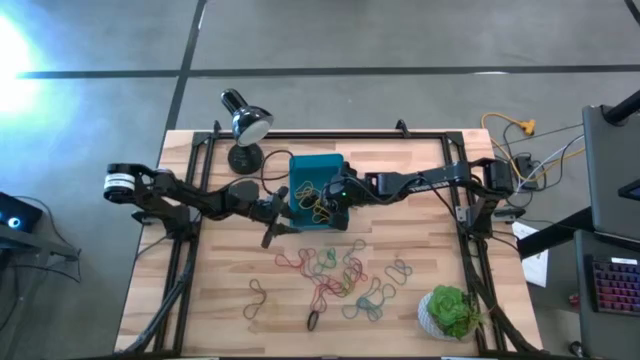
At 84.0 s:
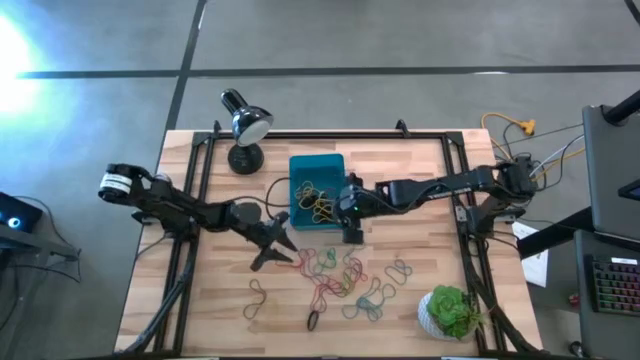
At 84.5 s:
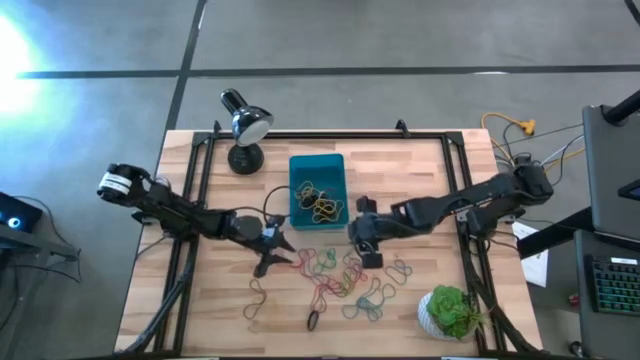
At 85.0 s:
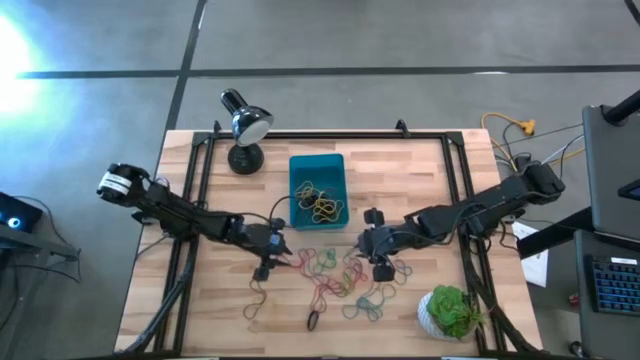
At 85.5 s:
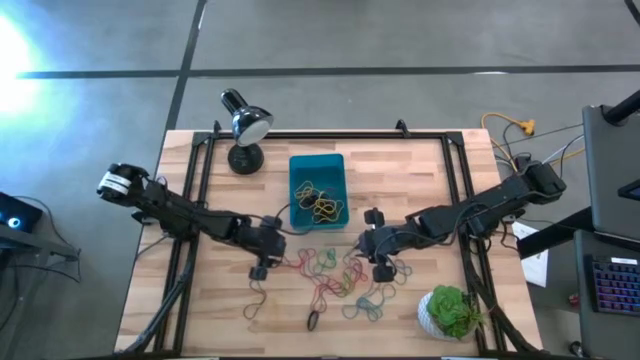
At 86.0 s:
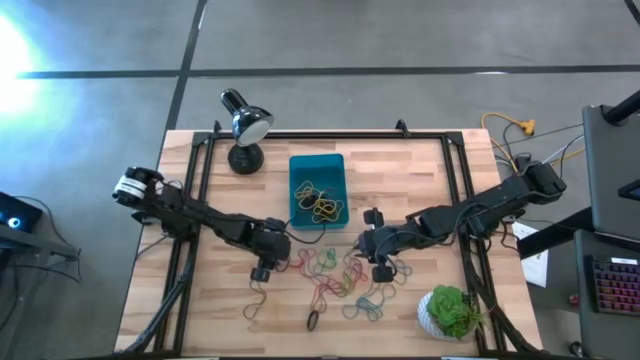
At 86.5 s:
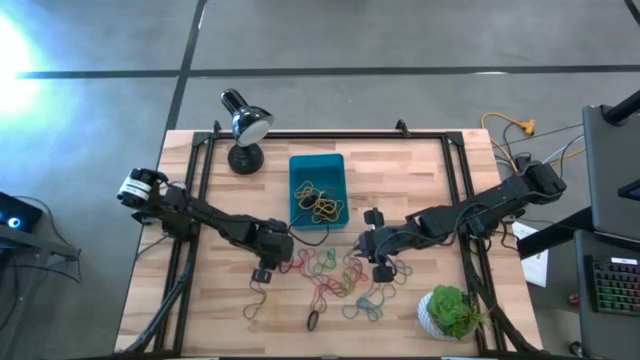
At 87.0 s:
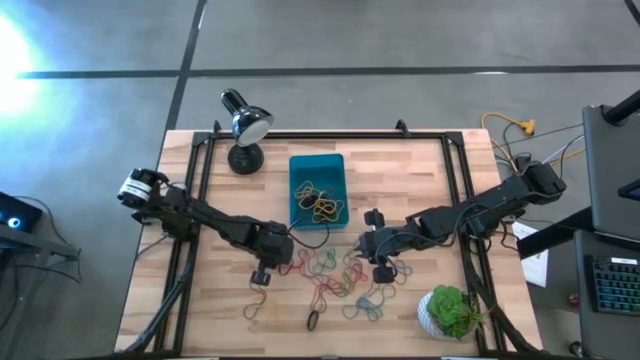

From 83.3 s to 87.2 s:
Task: Pick and place rubber bands into bin
Put the red rubber band into the blue bin

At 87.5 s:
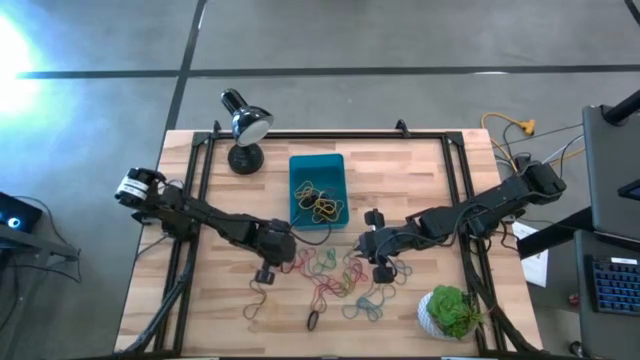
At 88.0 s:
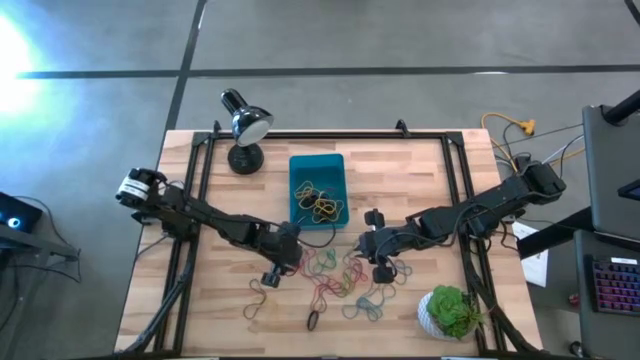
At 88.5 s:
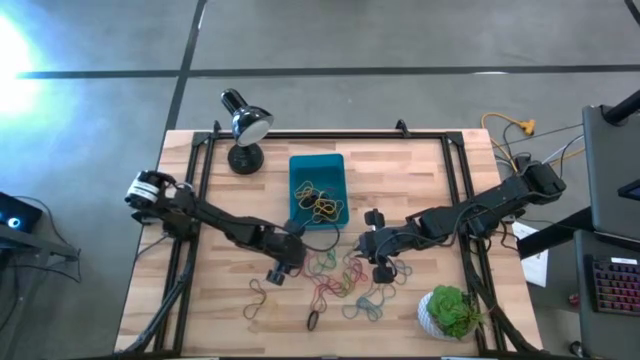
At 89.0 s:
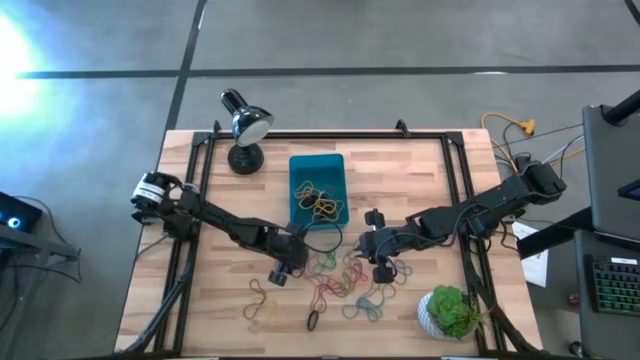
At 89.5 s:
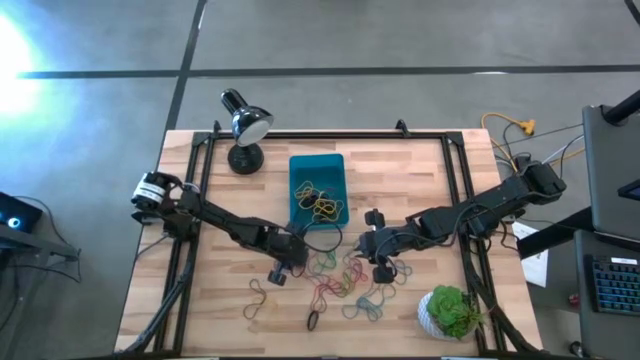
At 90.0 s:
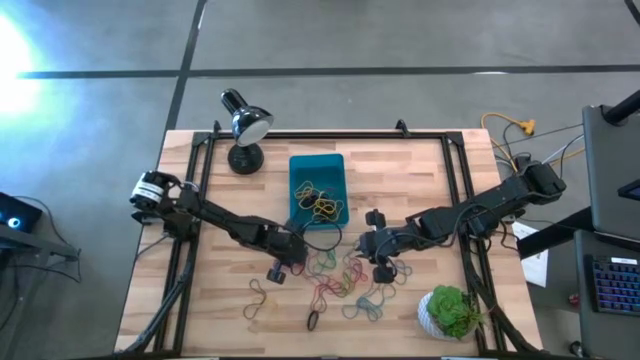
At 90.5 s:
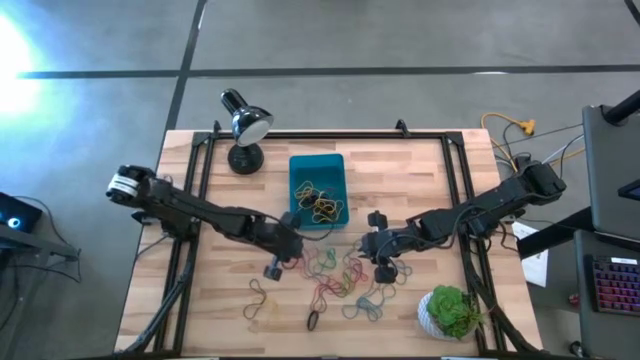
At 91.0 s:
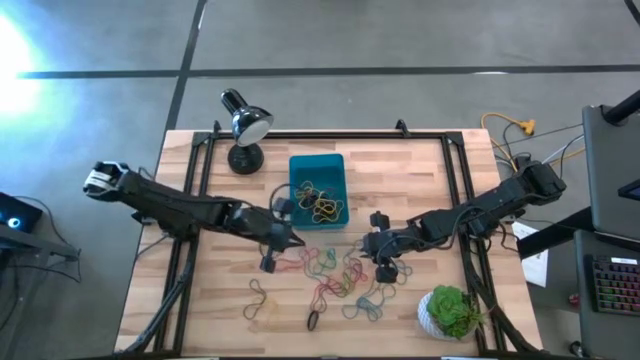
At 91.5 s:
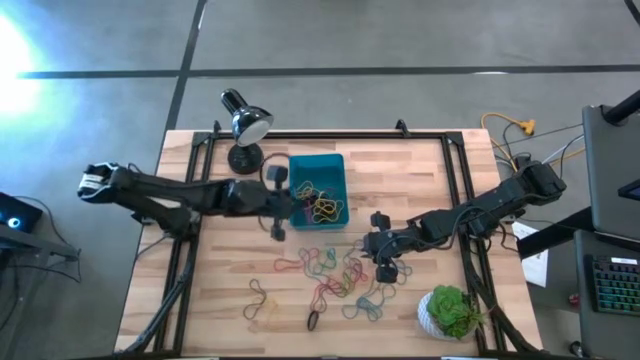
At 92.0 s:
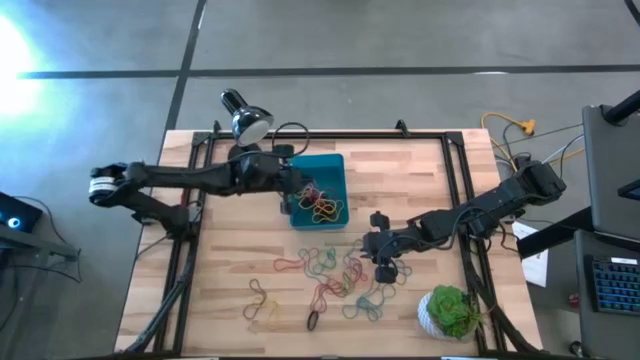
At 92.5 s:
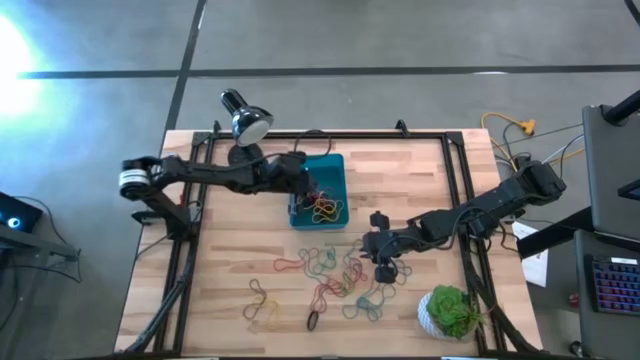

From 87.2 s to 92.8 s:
Put the red rubber band into the blue bin

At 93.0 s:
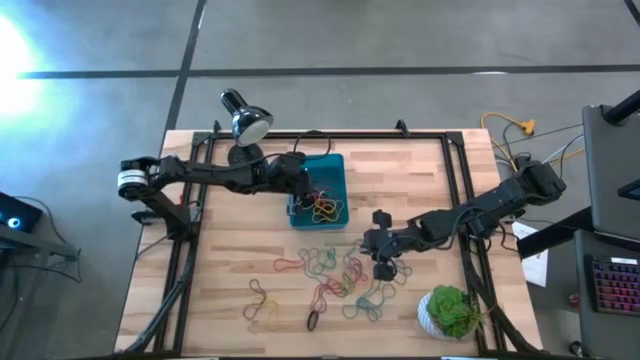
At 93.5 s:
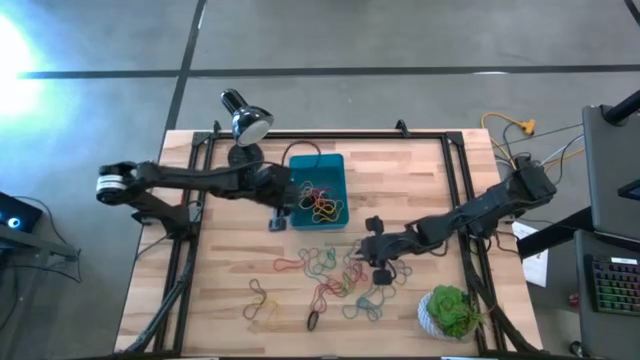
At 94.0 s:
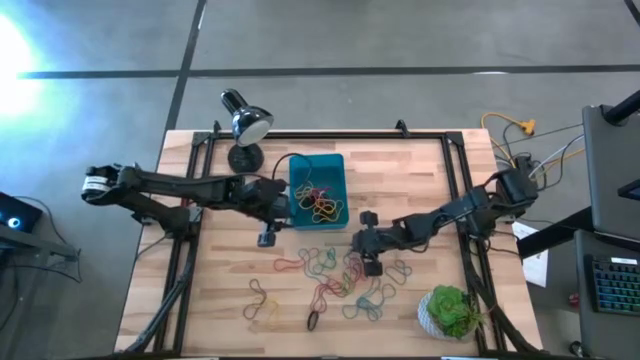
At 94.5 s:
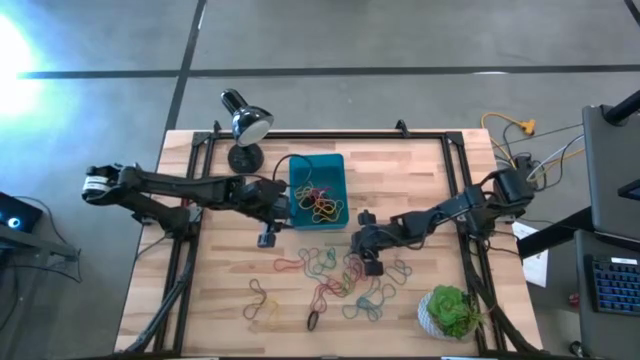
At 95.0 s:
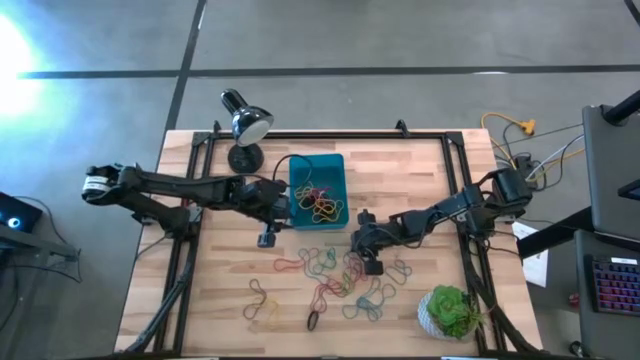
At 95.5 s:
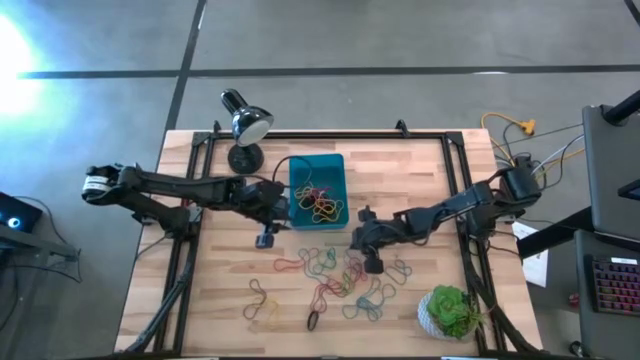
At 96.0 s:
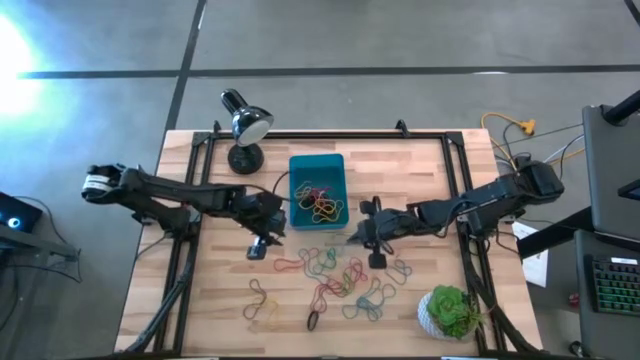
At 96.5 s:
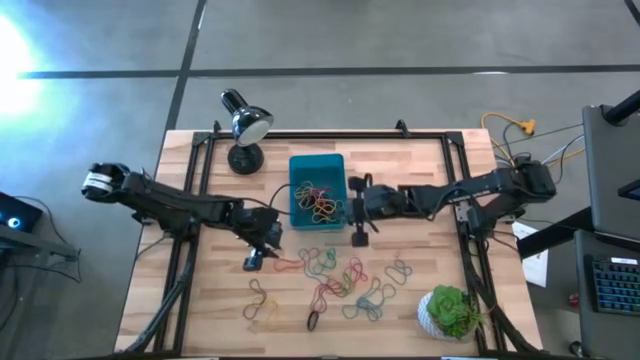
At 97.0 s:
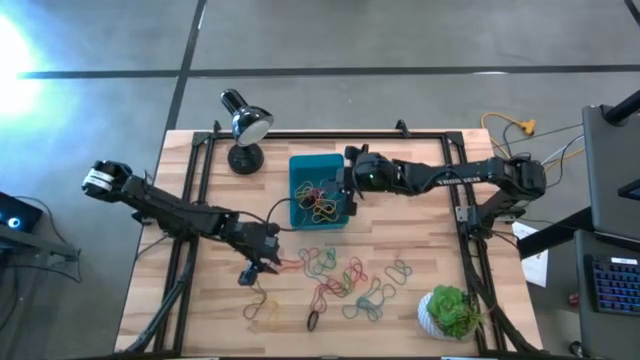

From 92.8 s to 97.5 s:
Put the blue rubber band into the blue bin

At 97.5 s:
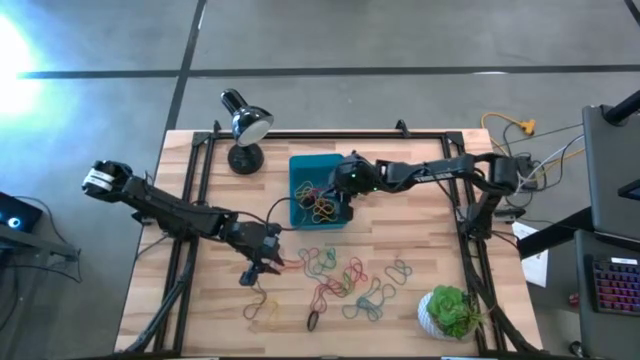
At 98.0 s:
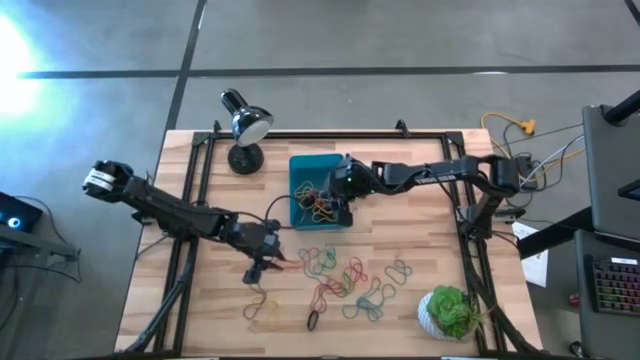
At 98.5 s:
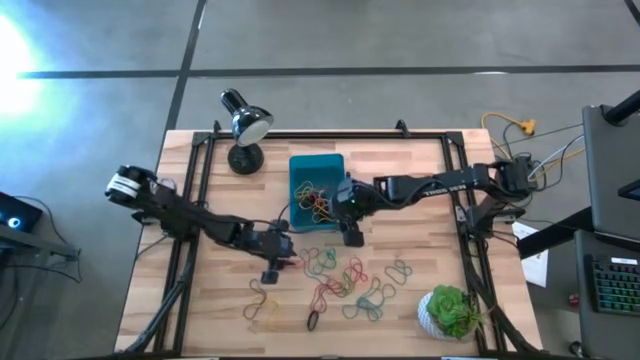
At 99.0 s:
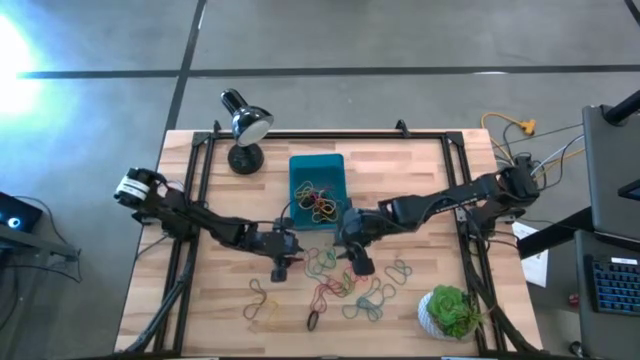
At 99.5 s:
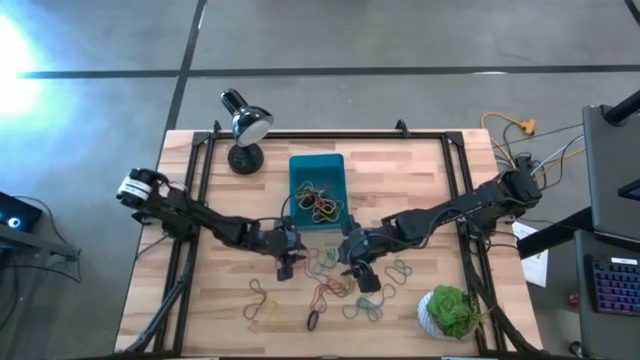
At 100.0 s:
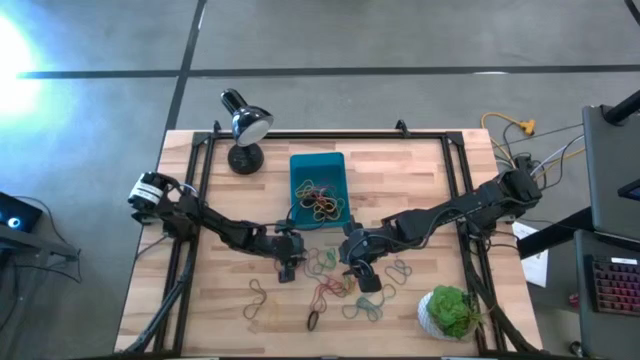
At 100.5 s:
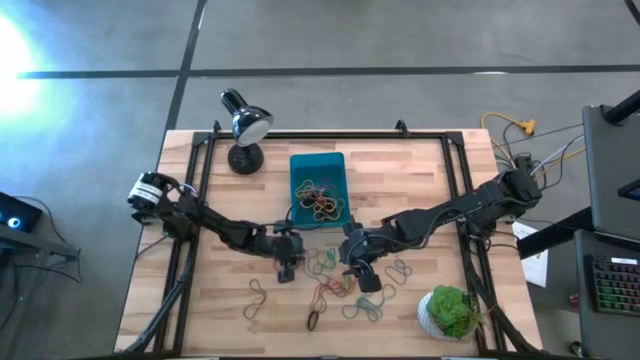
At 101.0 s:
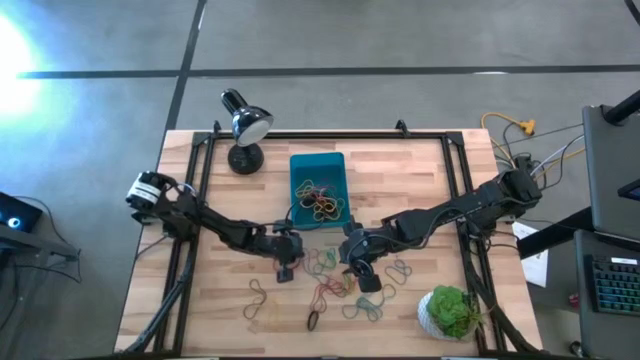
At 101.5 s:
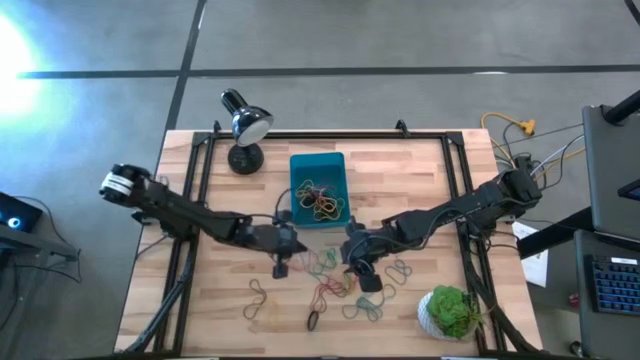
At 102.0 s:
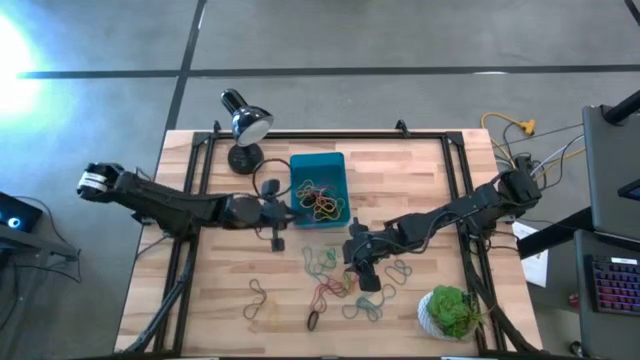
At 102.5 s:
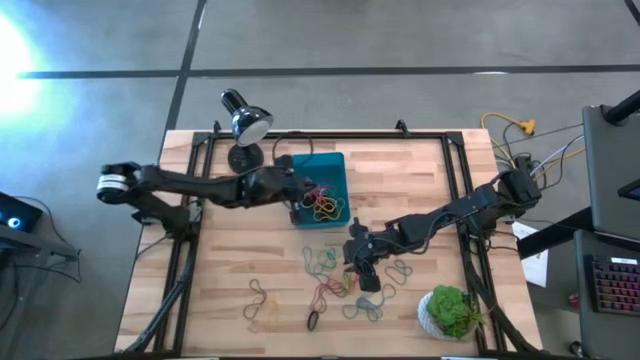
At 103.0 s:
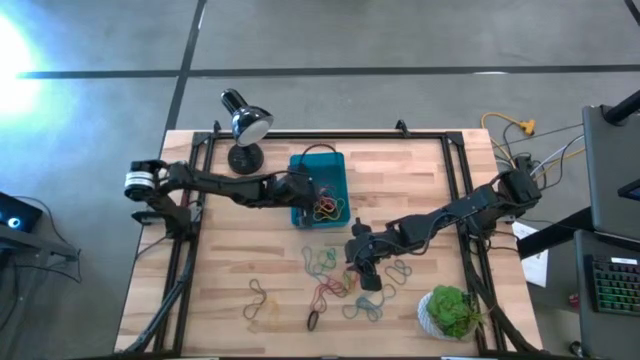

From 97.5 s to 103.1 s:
Put the red rubber band into the blue bin

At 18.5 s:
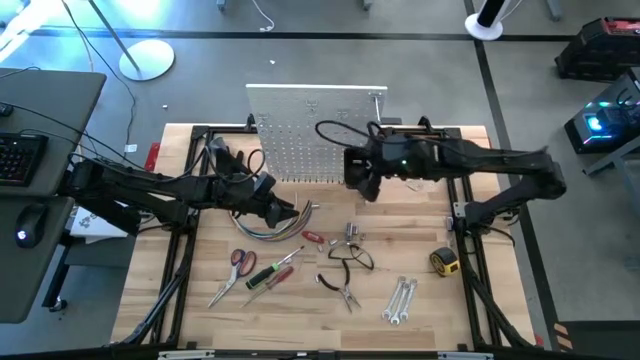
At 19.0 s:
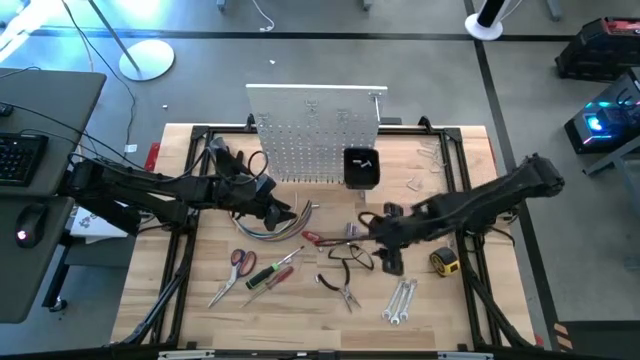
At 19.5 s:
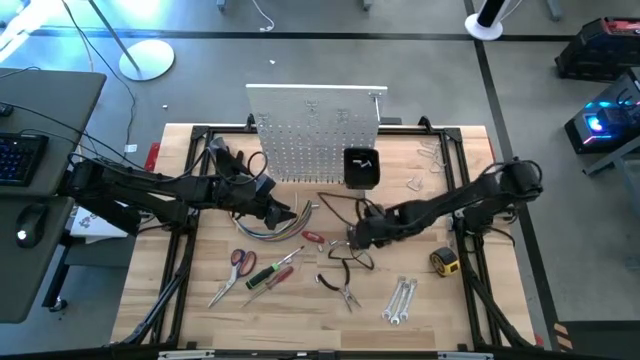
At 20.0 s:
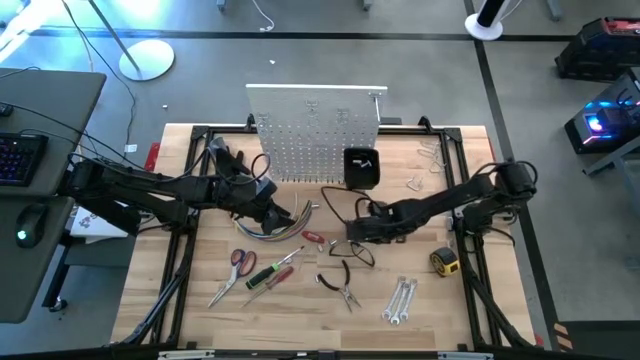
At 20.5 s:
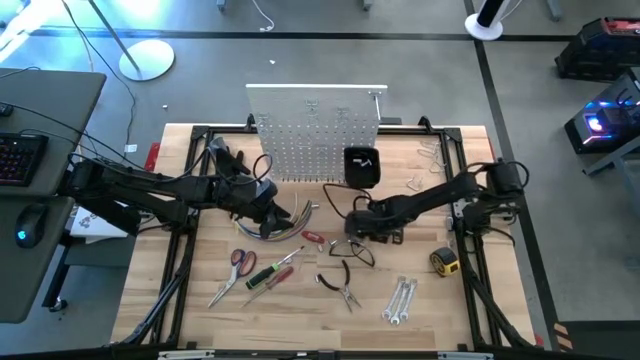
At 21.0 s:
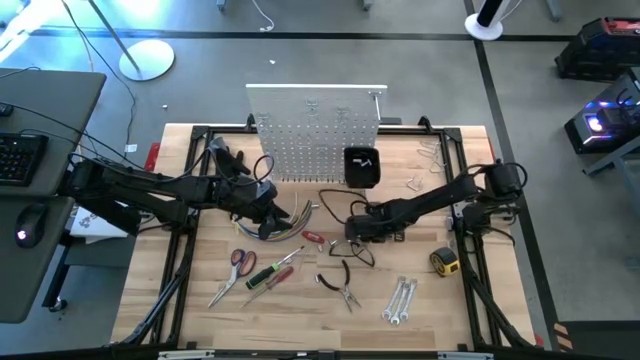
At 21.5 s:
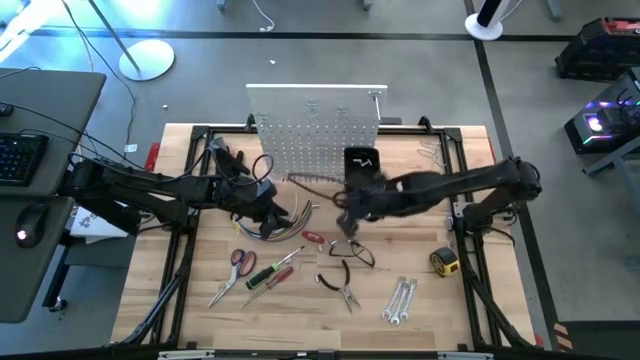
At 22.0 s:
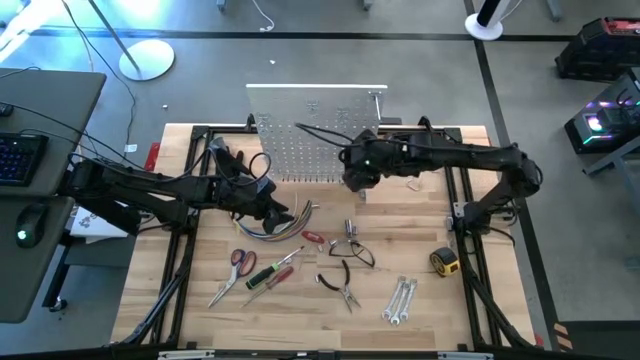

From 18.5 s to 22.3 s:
Task: Hang tools onto peg board
Put the socket into the black bin on the peg board
